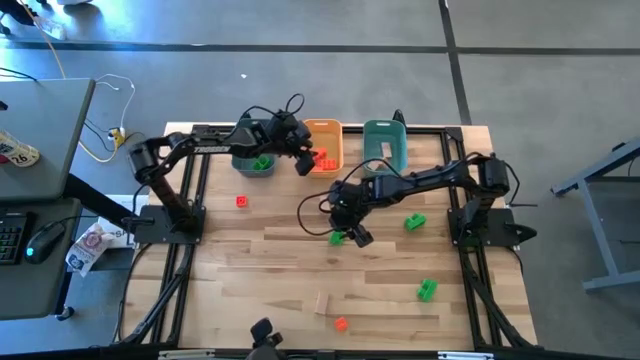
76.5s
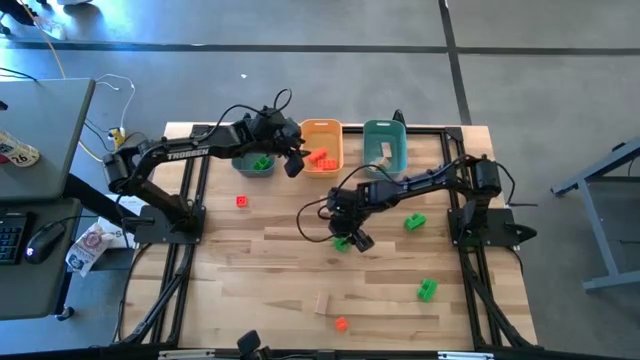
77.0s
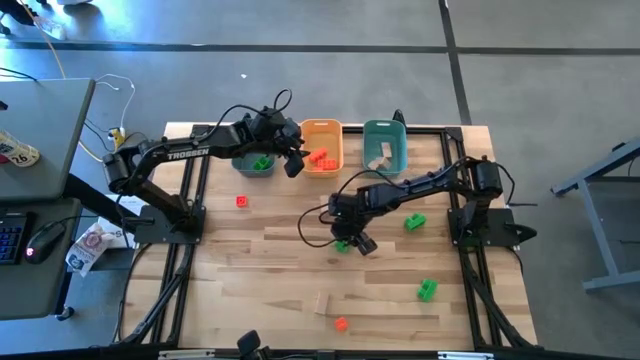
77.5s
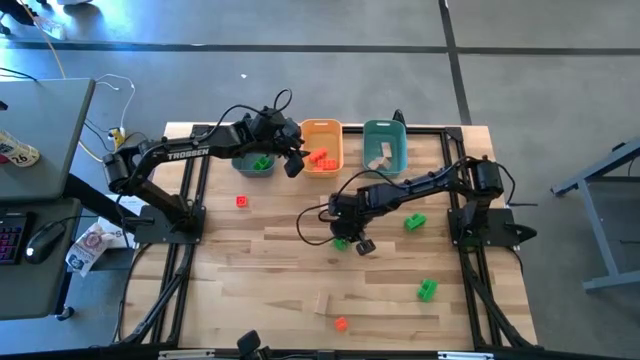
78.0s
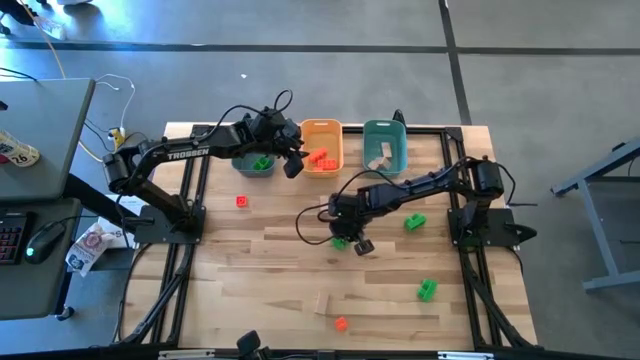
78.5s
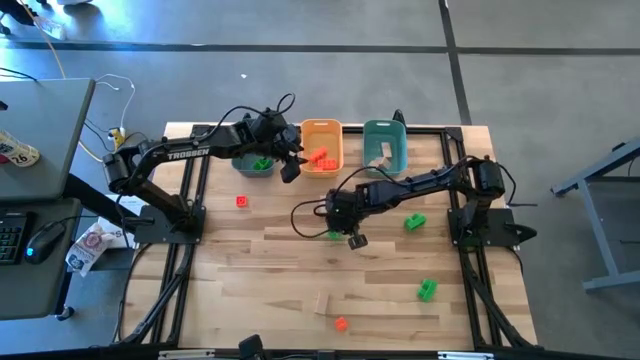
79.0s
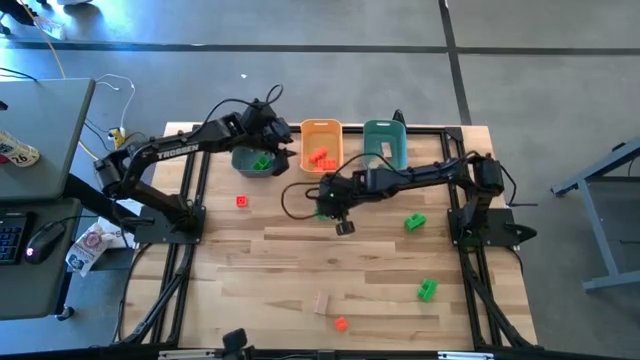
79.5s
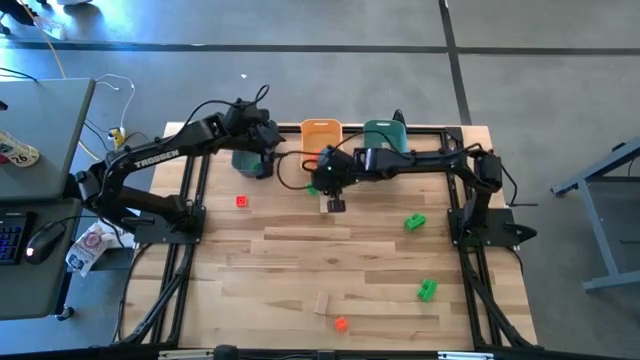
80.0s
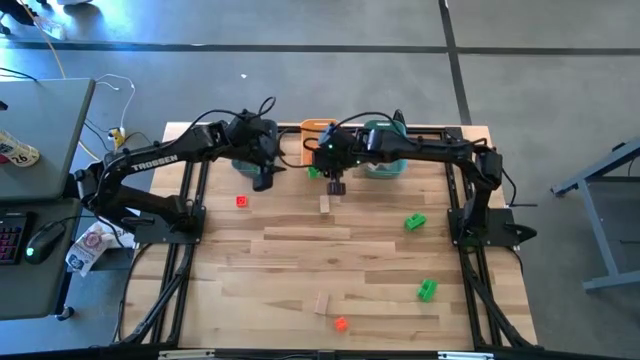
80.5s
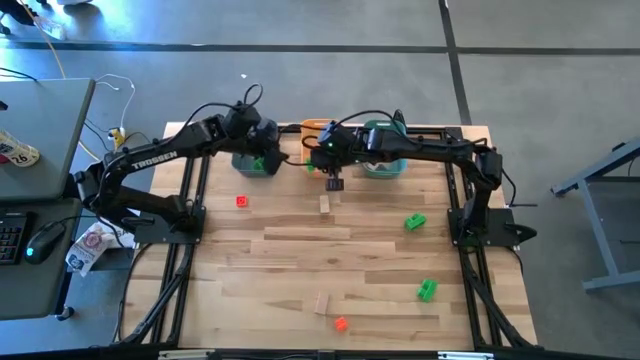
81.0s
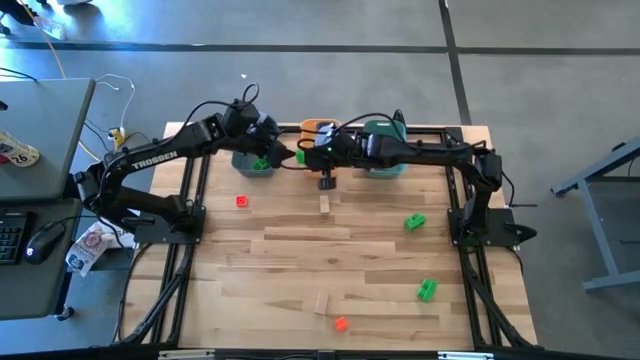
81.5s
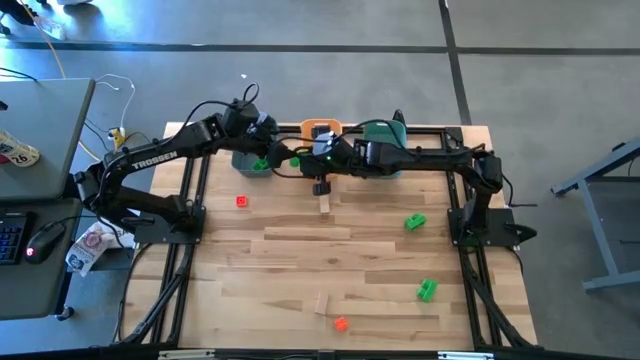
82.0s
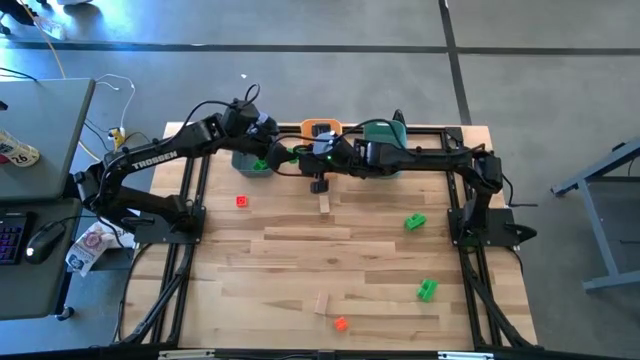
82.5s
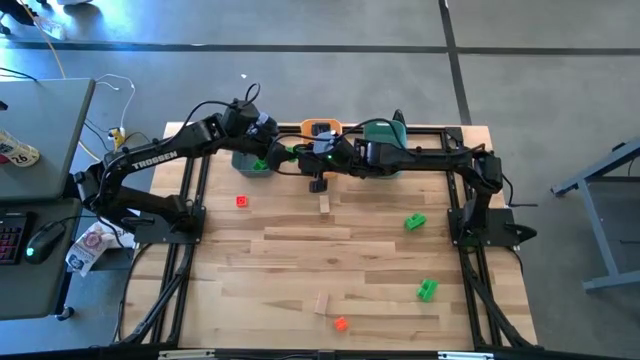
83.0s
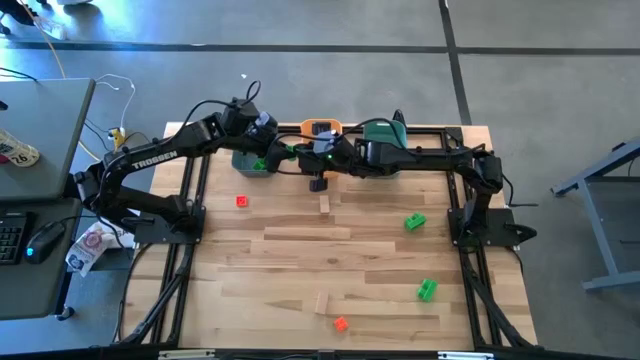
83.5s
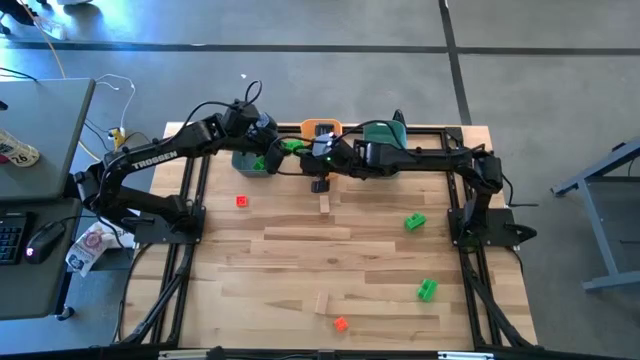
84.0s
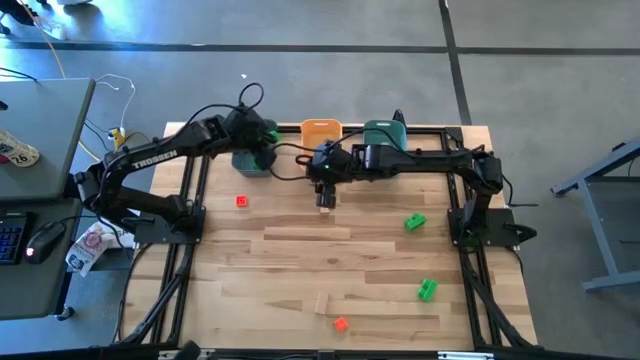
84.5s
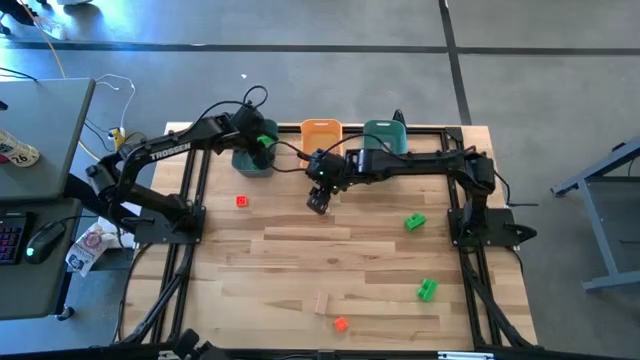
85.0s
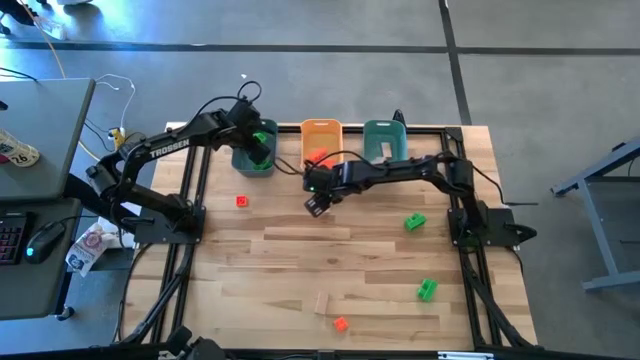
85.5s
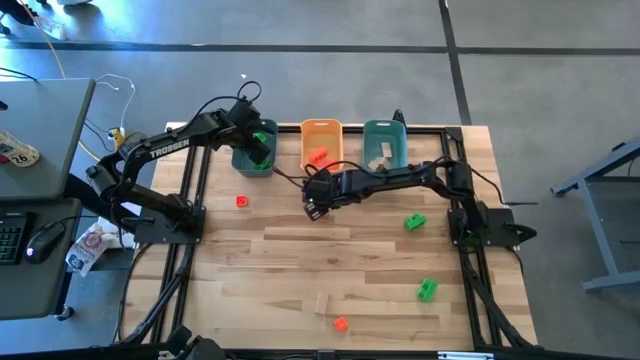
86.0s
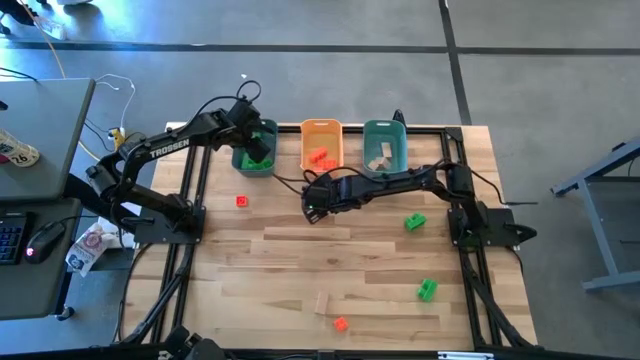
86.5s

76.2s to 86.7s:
Task: Sort & place blocks by color
Put the green game piece into the dark blue bin

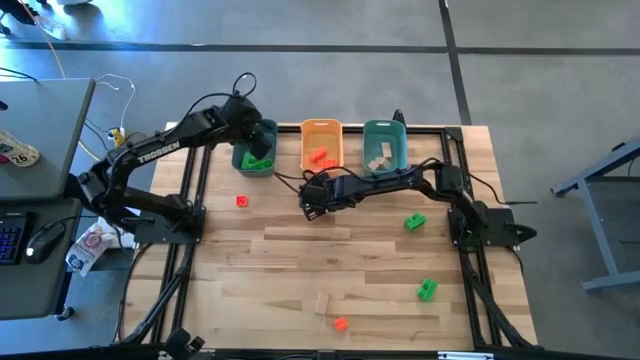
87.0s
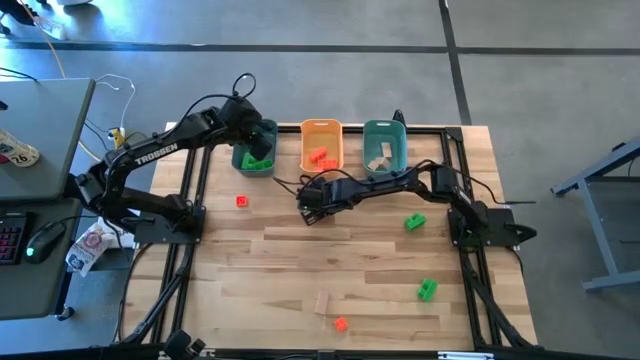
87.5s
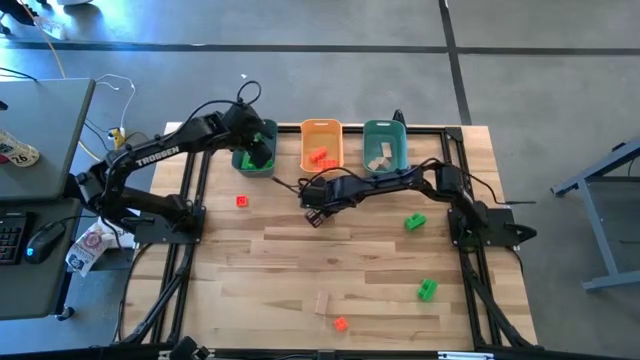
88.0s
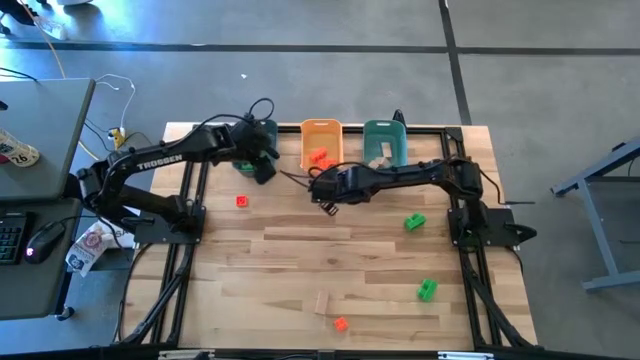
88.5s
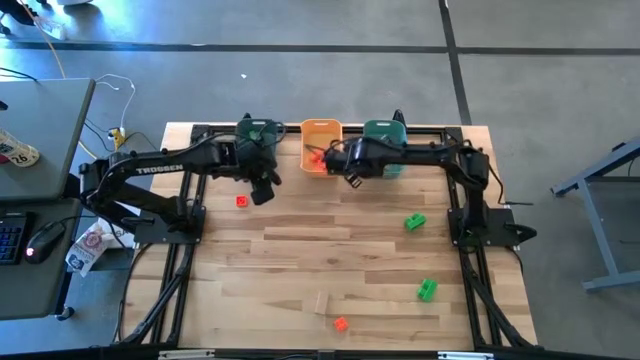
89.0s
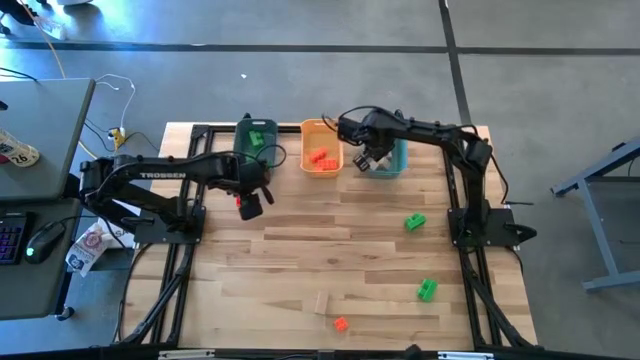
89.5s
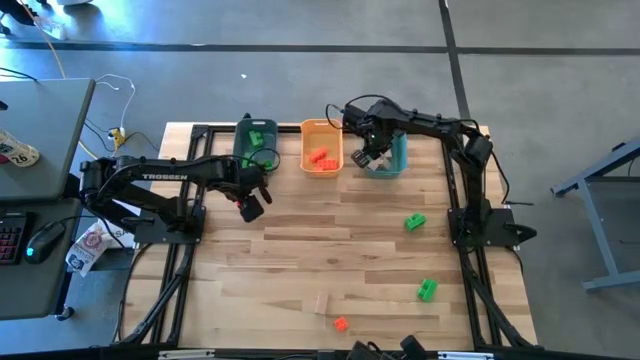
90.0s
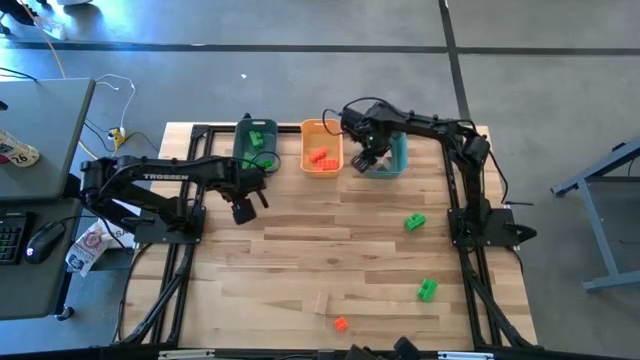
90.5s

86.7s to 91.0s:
Put the brown block into the green bin

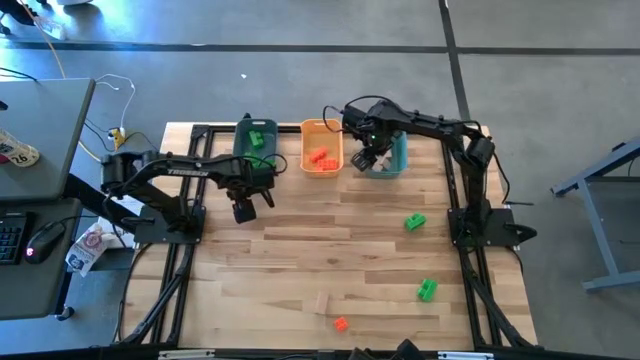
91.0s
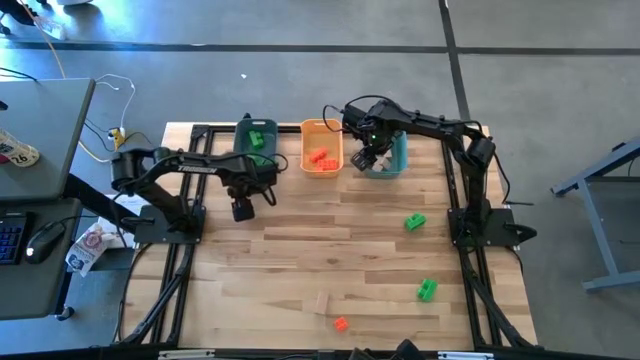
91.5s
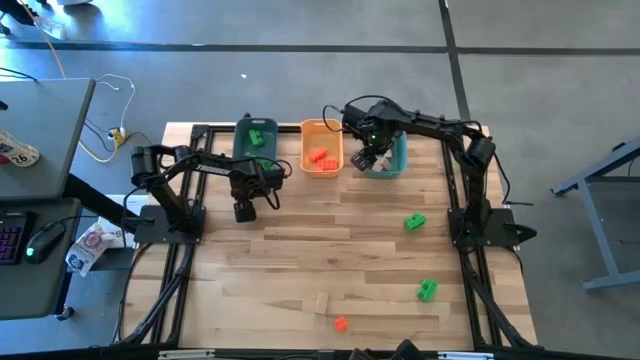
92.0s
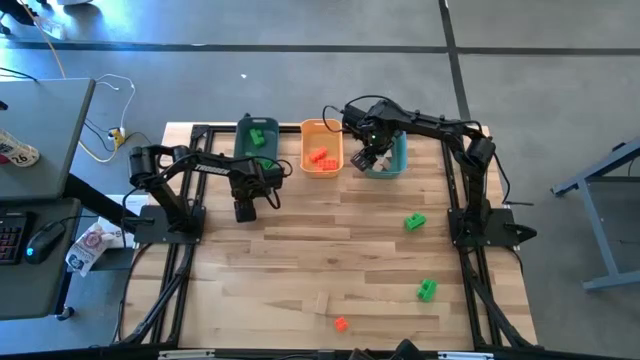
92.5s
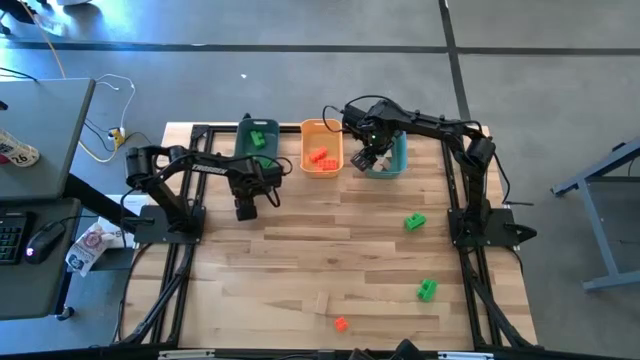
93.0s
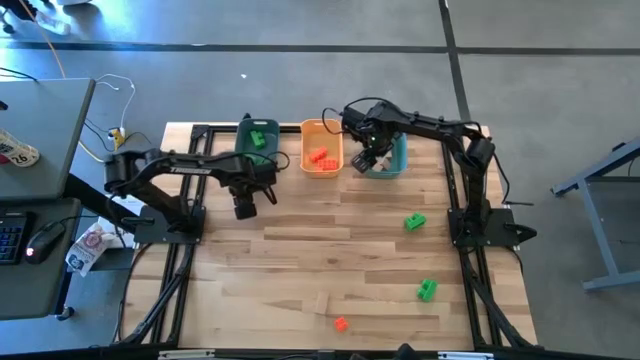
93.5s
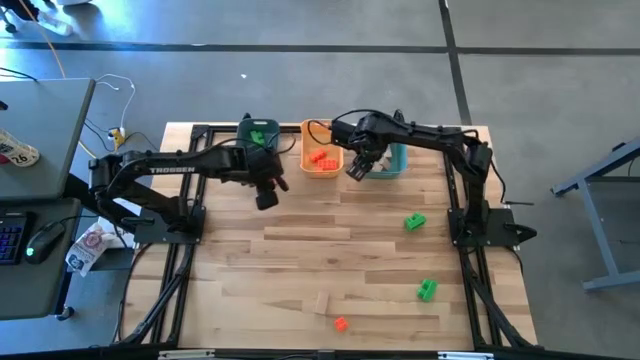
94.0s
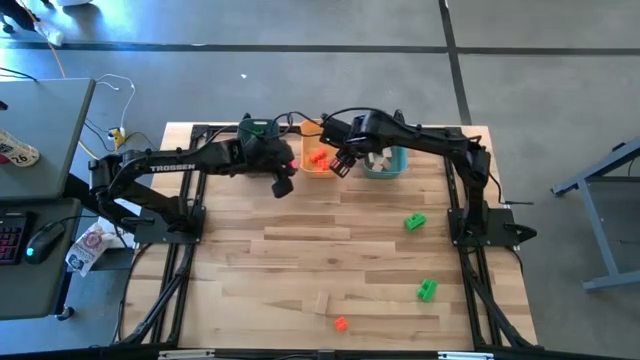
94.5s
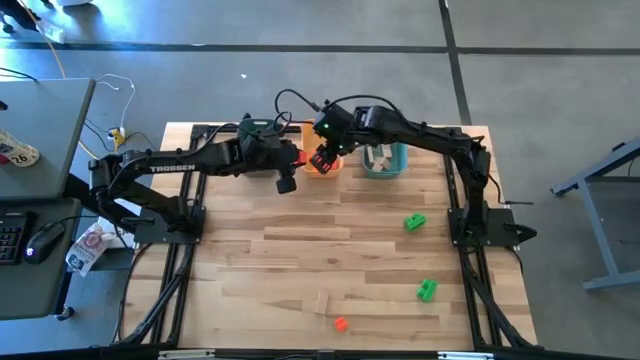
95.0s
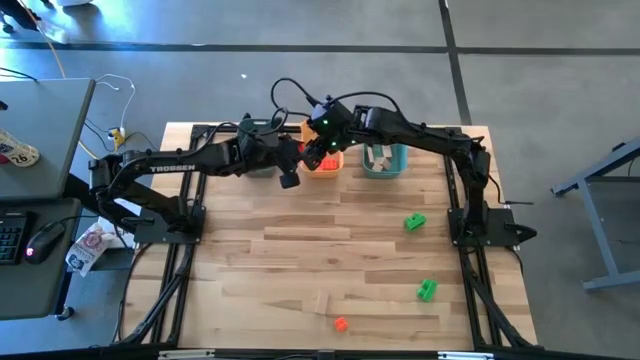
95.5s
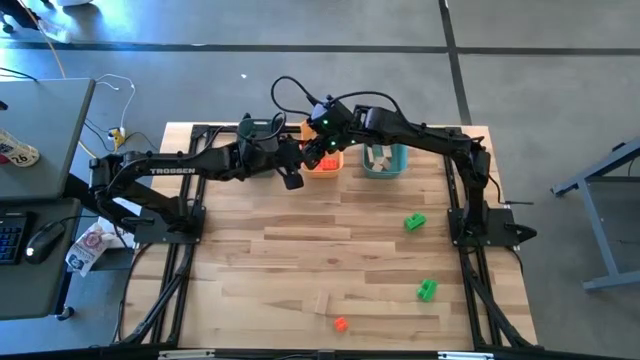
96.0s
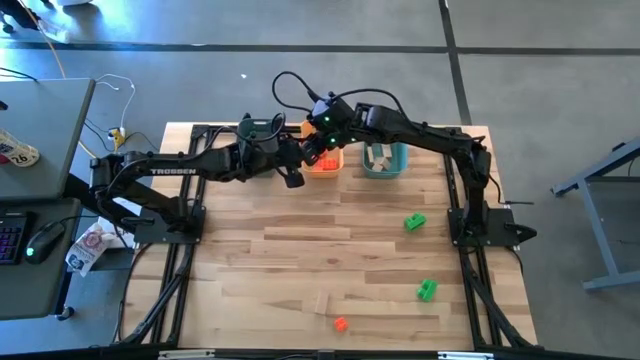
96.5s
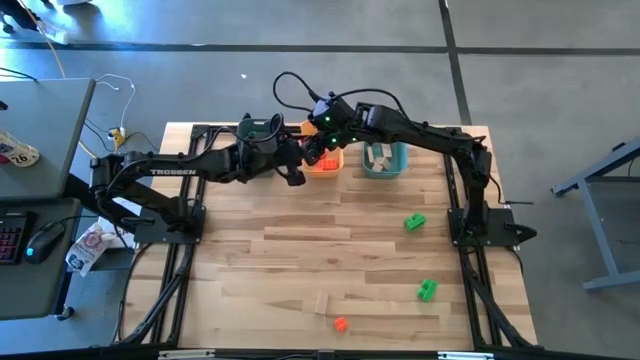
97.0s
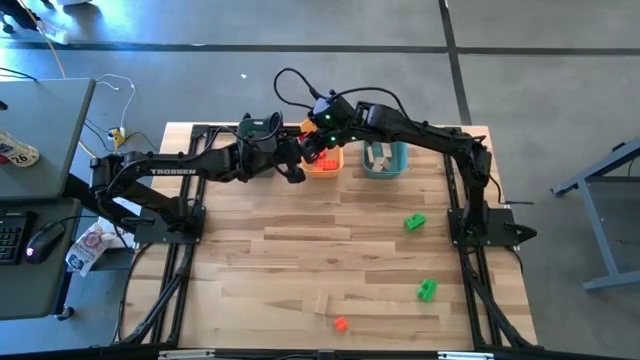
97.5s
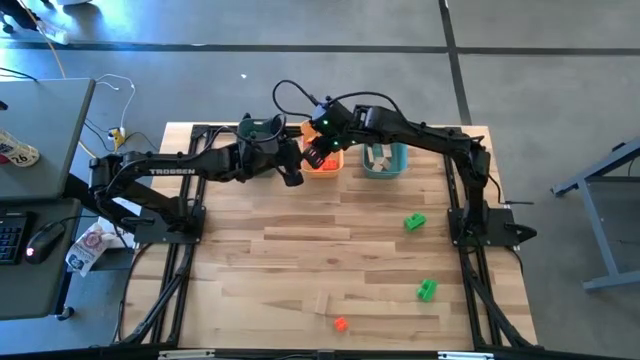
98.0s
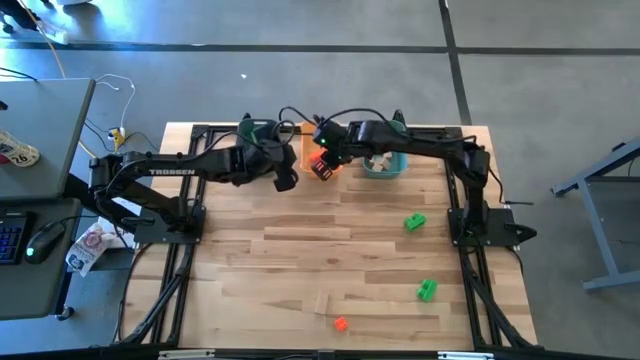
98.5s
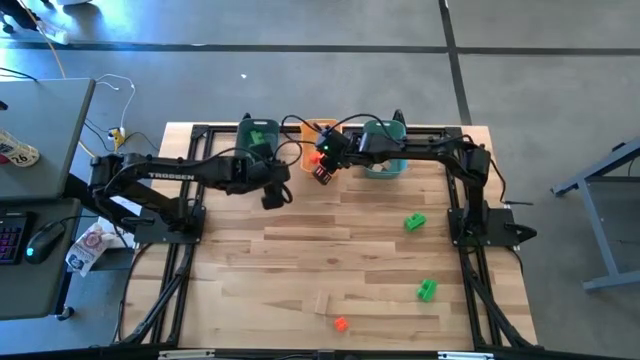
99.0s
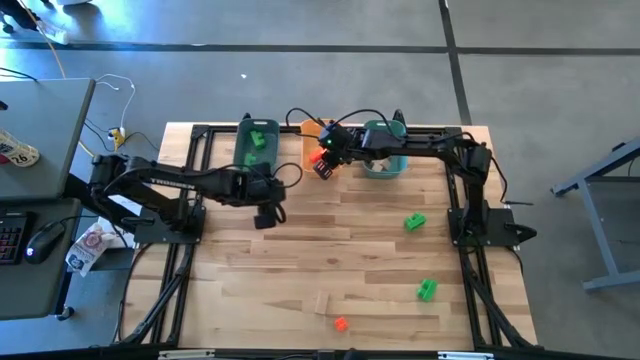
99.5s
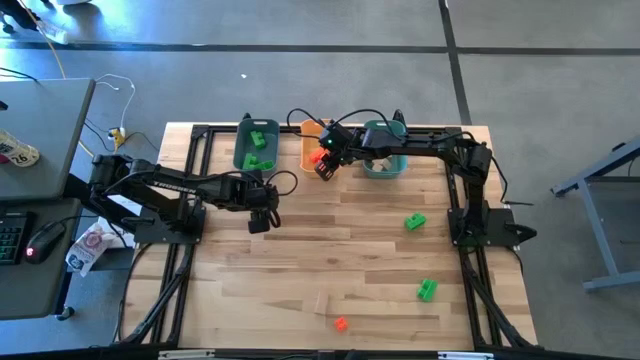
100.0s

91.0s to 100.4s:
Put the orange game piece into the yellow bin
